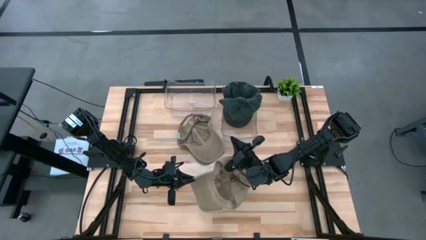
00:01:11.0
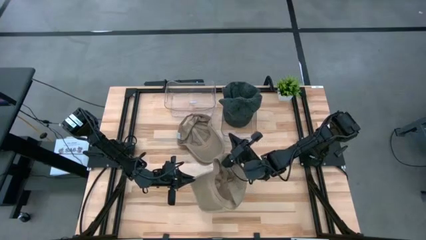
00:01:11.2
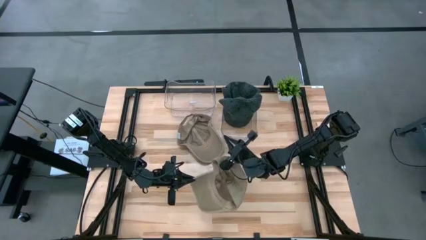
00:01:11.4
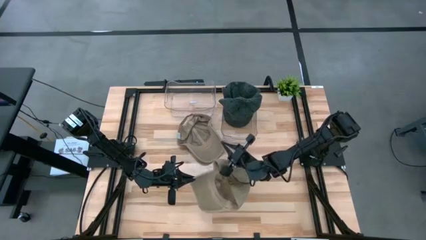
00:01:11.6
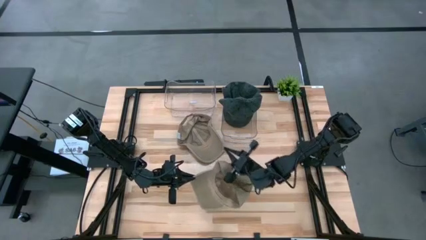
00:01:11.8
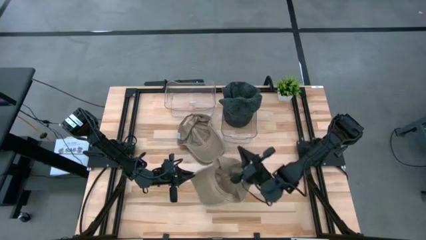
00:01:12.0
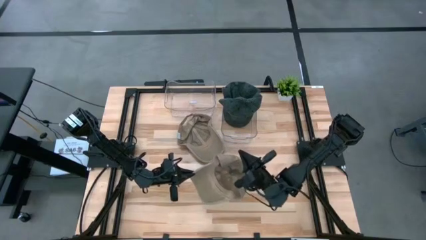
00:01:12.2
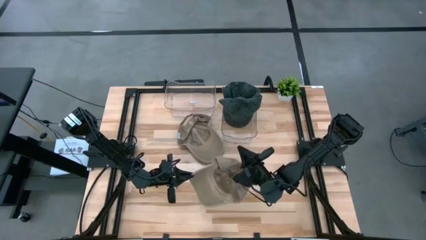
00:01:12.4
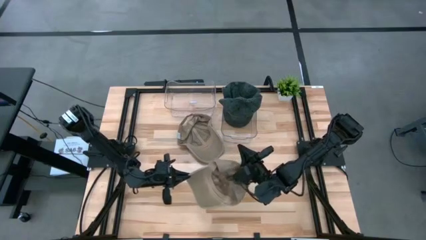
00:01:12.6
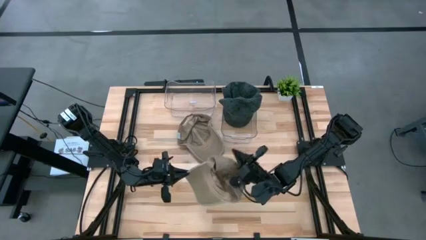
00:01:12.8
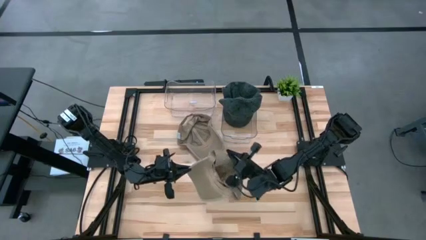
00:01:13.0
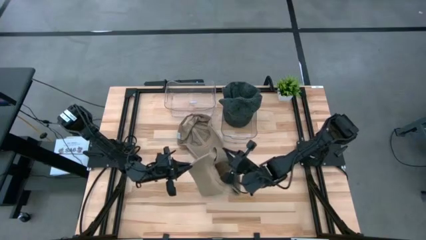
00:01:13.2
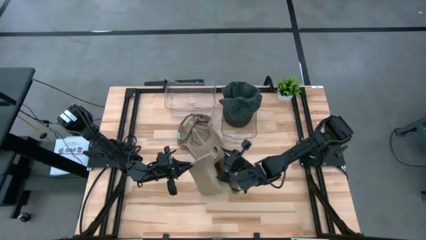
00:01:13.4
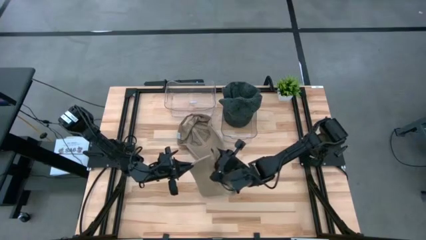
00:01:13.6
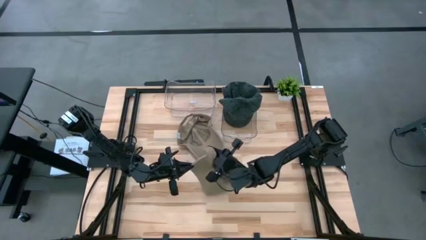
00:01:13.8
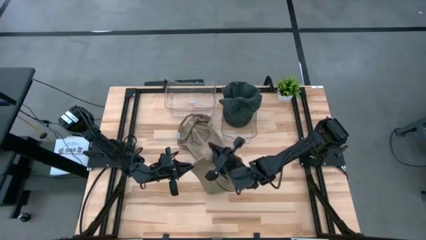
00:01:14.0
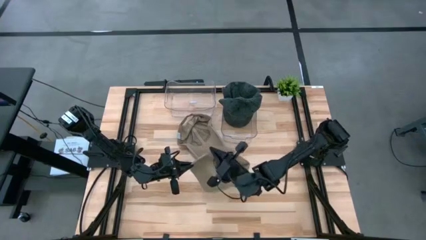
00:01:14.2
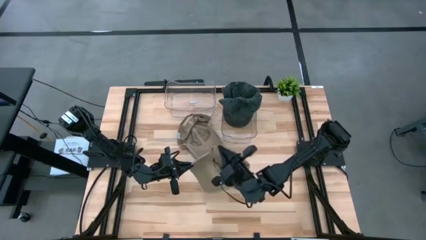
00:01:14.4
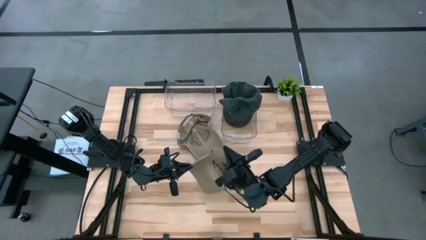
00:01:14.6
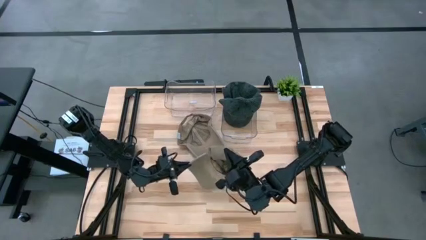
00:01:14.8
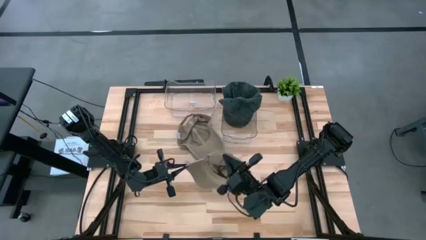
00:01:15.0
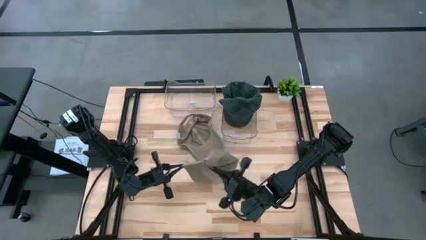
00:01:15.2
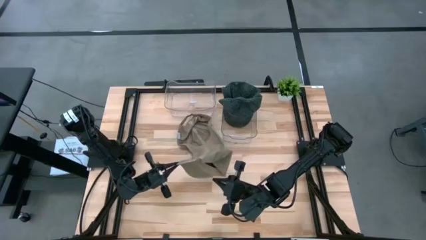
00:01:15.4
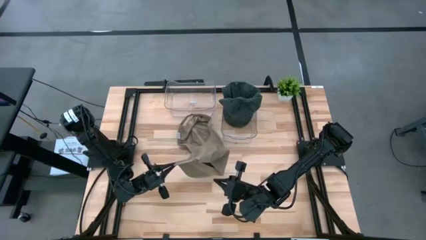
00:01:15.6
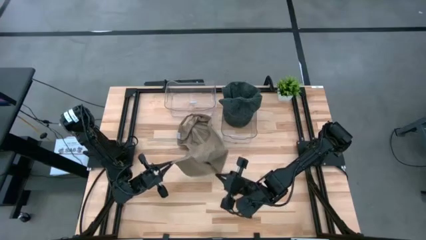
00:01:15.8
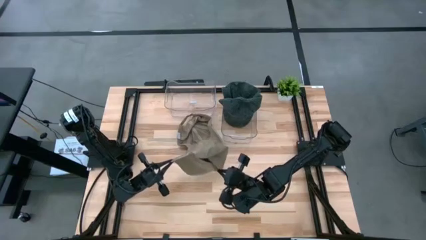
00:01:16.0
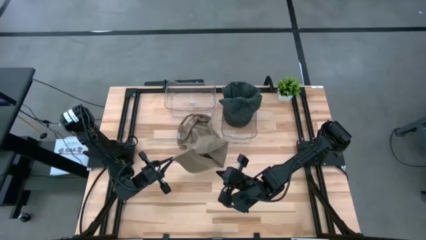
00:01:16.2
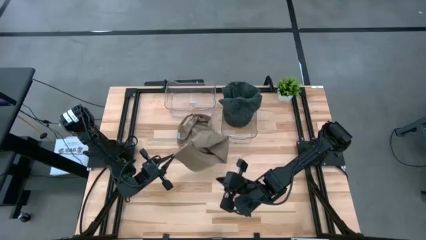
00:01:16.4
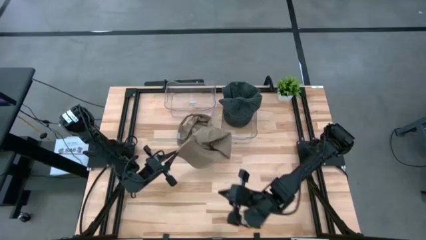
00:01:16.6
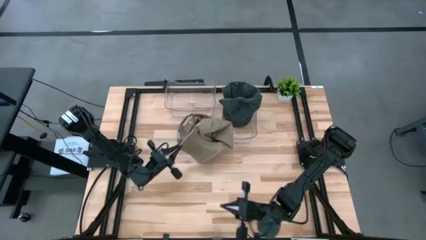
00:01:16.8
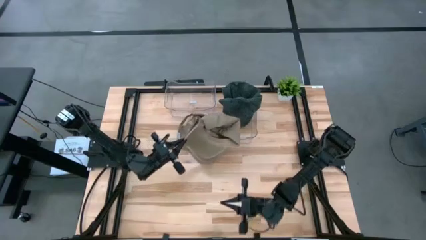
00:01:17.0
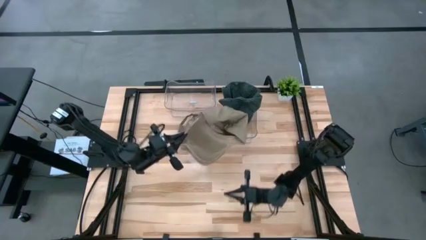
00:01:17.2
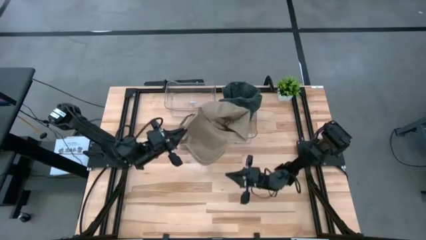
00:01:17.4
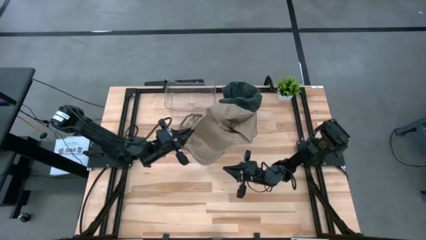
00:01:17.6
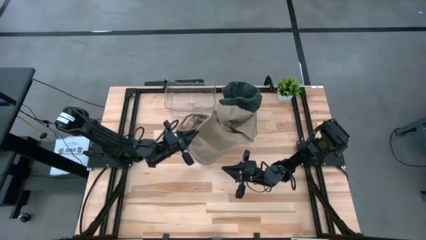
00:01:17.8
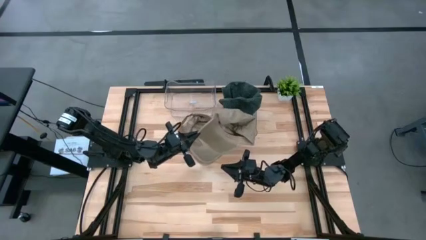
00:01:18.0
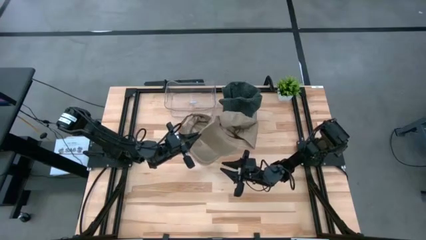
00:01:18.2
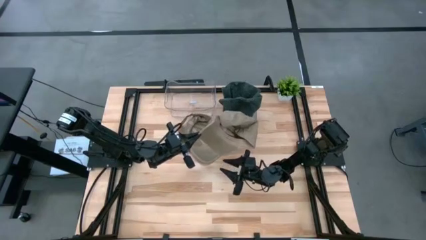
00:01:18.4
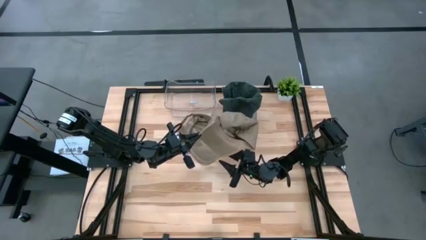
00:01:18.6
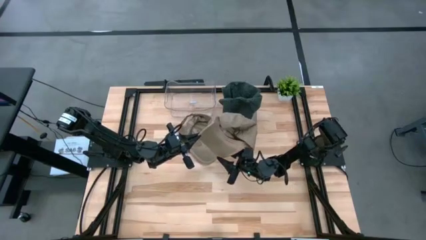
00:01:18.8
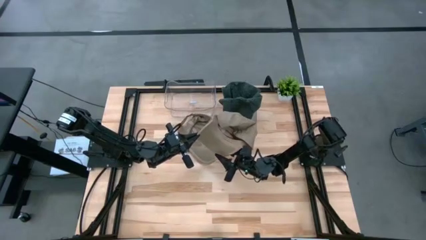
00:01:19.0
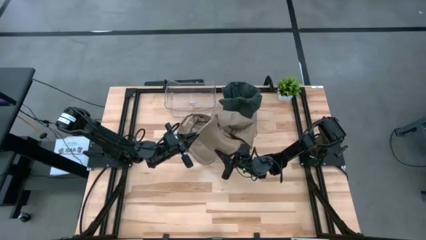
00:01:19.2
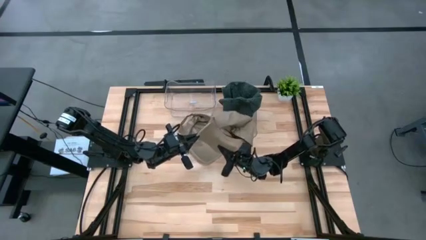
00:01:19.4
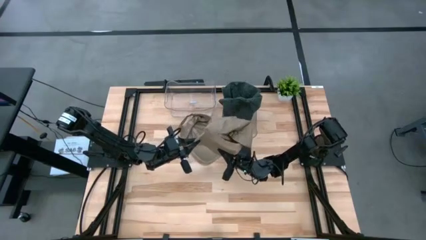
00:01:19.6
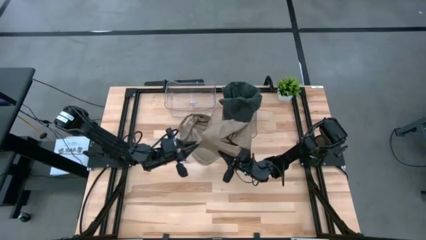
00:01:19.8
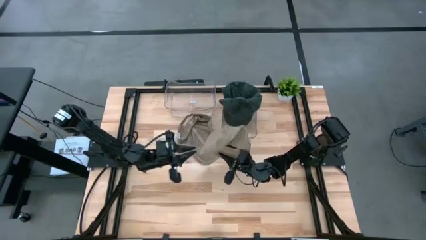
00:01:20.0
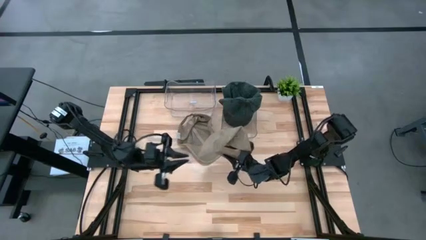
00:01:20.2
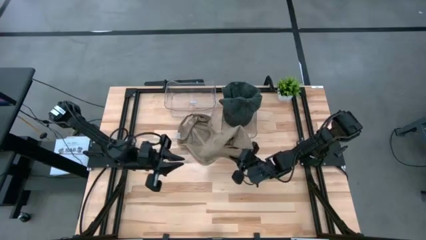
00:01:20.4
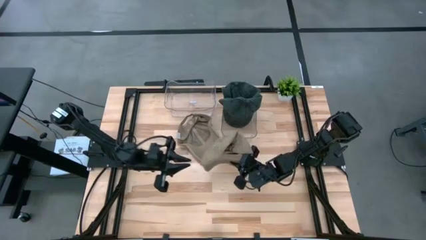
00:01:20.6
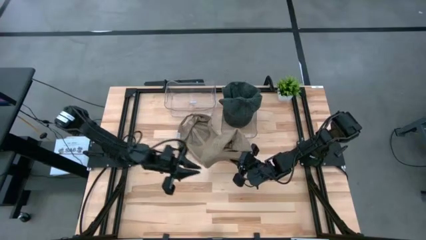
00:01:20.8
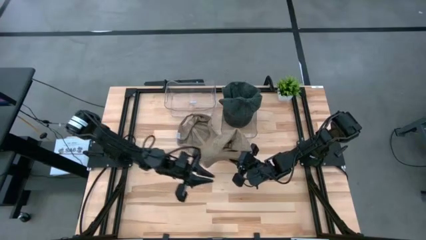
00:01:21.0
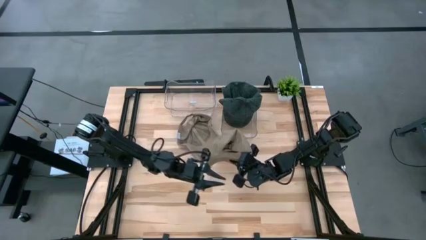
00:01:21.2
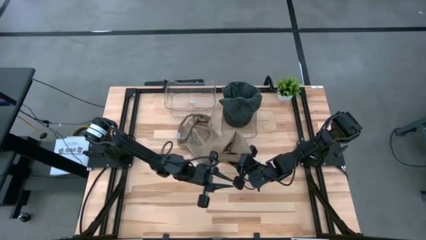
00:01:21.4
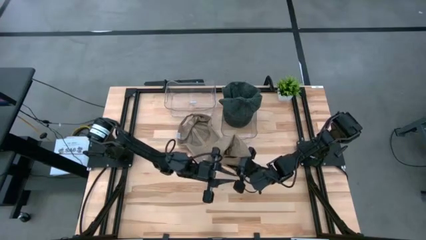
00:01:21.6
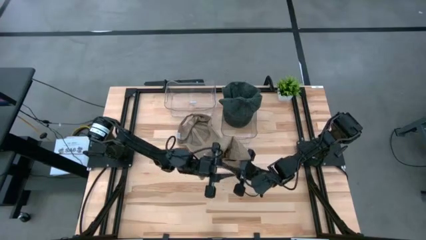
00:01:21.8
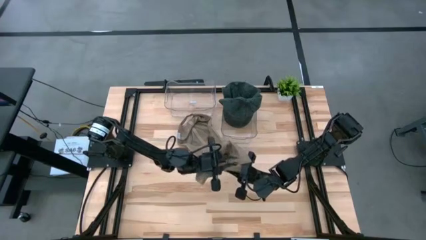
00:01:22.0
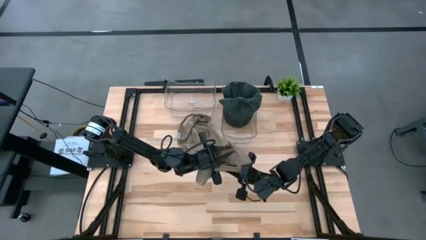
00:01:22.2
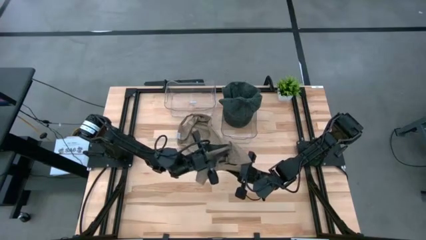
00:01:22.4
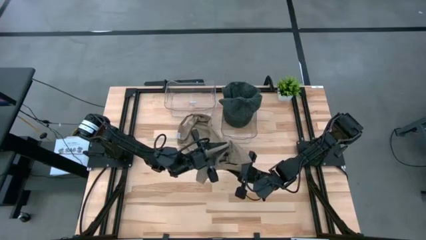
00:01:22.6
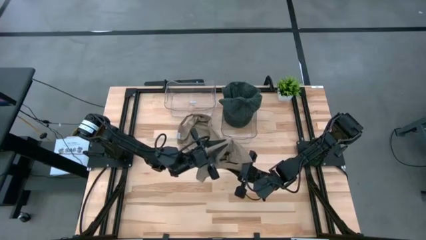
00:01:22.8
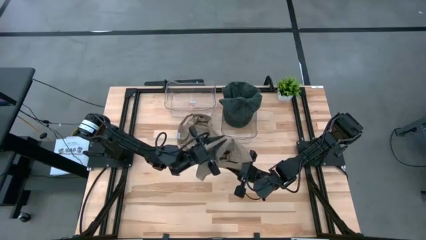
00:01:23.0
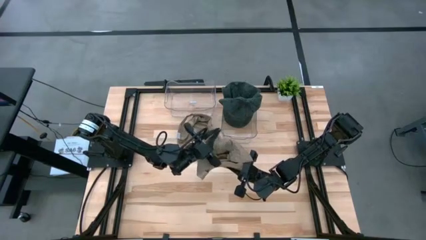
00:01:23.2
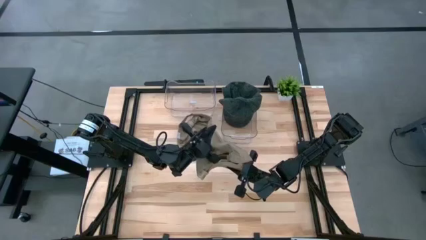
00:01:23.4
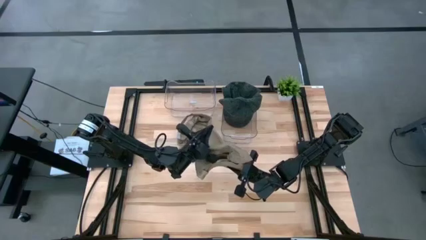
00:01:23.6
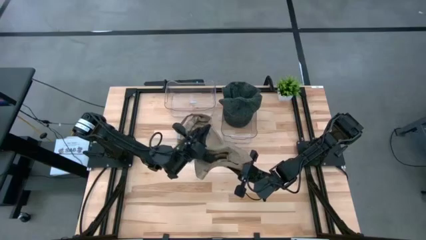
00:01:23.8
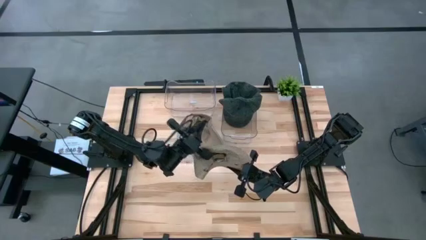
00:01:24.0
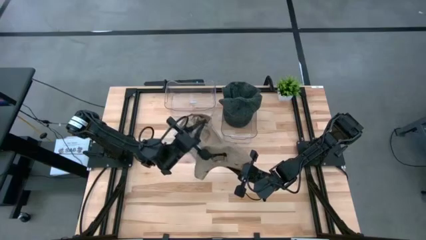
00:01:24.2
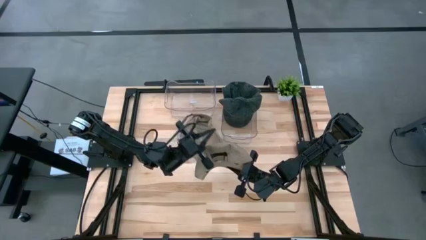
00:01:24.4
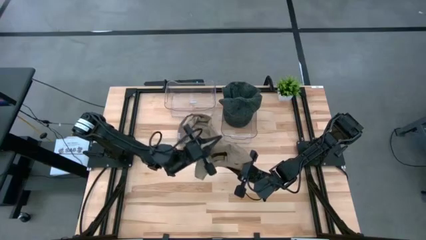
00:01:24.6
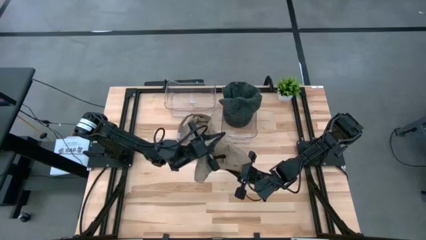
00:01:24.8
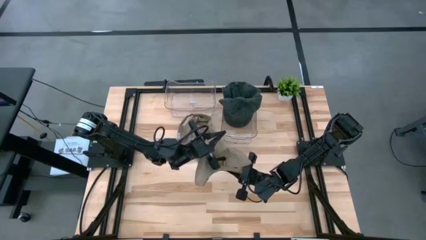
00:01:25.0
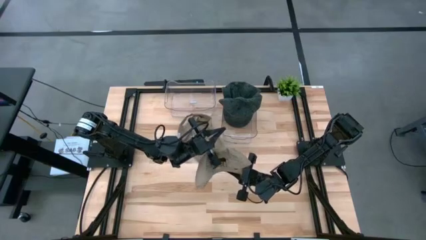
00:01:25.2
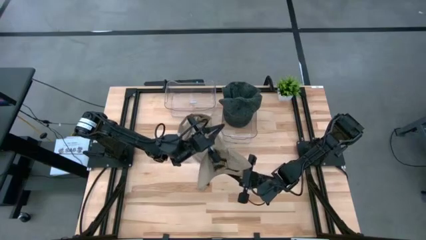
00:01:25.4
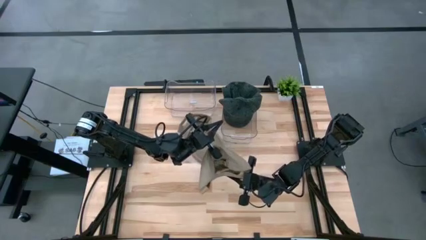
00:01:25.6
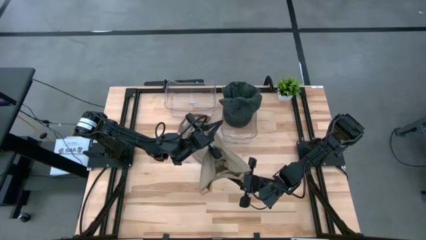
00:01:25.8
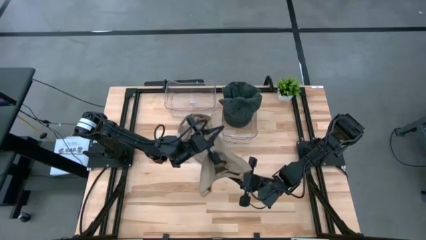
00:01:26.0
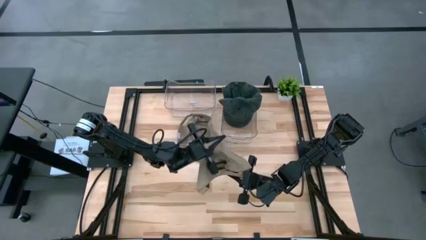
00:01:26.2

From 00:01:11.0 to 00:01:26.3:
Task: Pick & Place hat
Put the bottom brown cap into the left transparent bin
